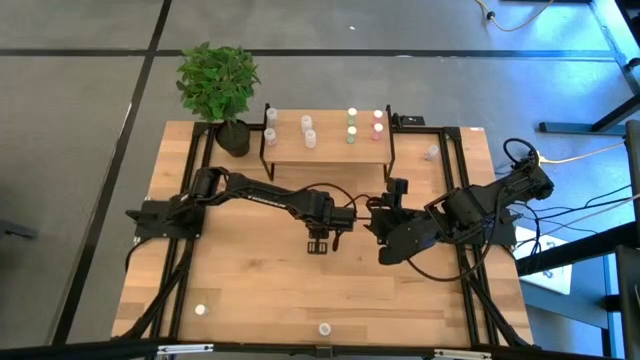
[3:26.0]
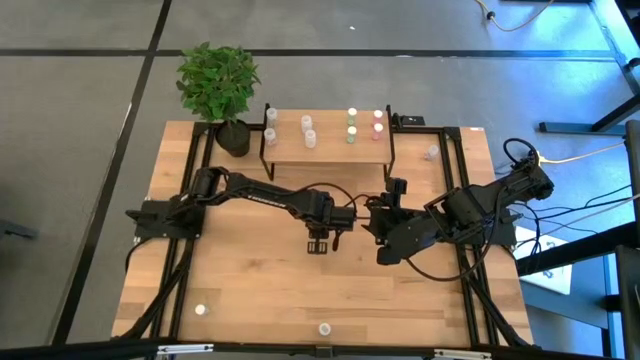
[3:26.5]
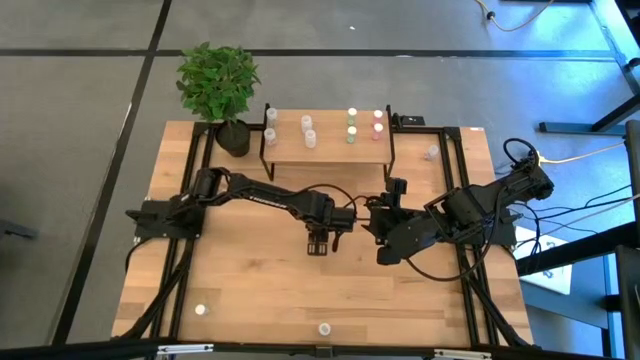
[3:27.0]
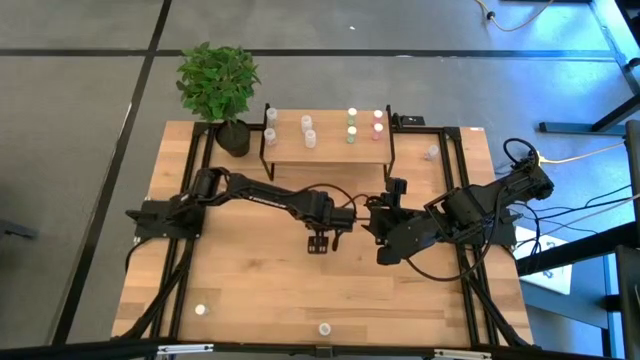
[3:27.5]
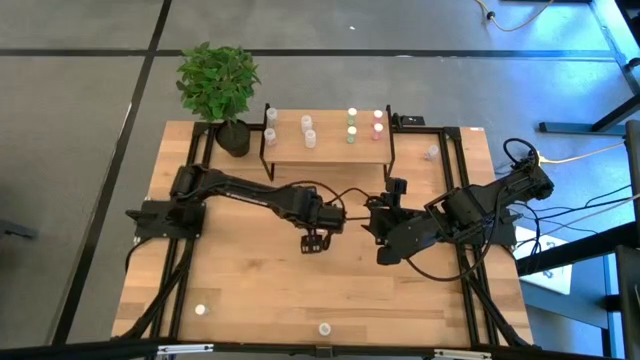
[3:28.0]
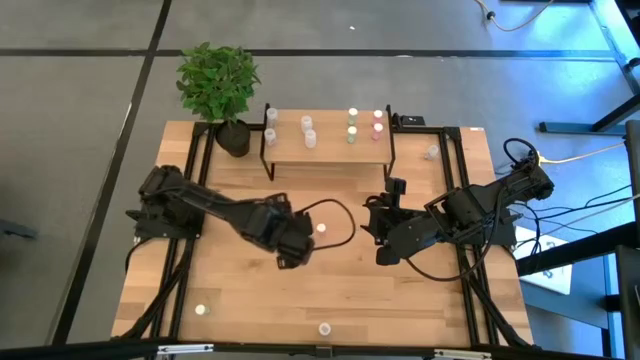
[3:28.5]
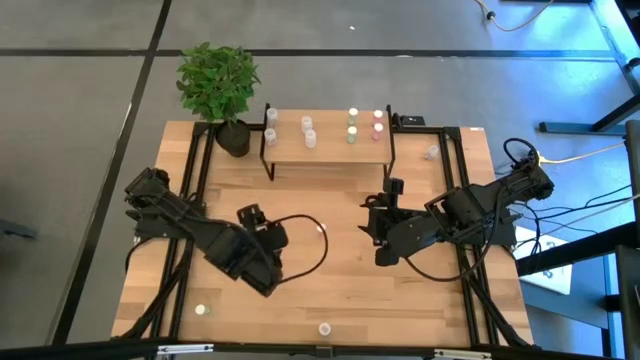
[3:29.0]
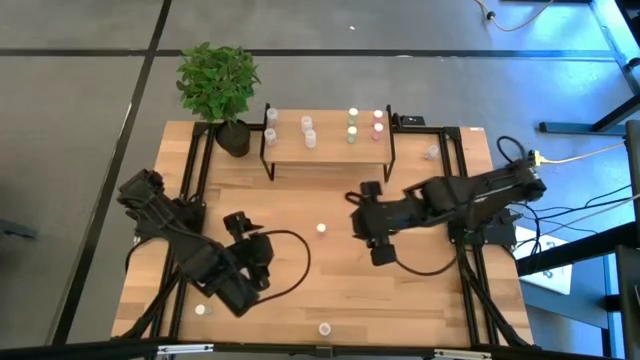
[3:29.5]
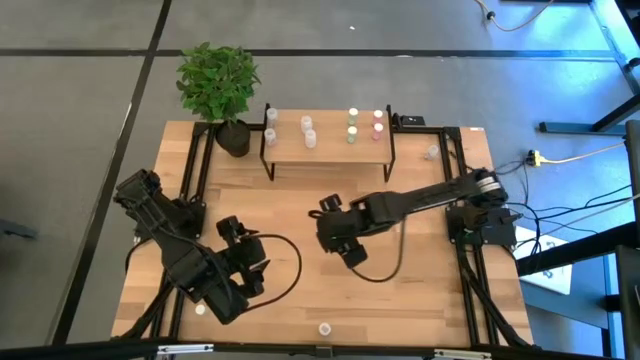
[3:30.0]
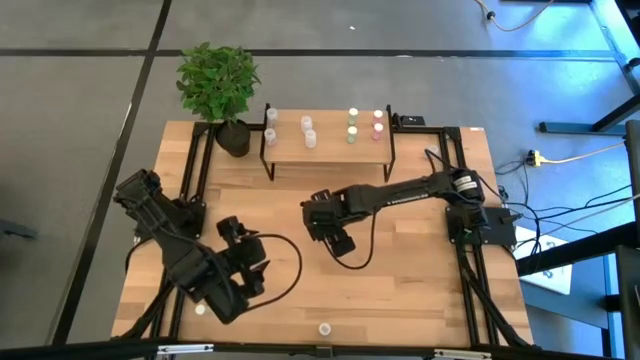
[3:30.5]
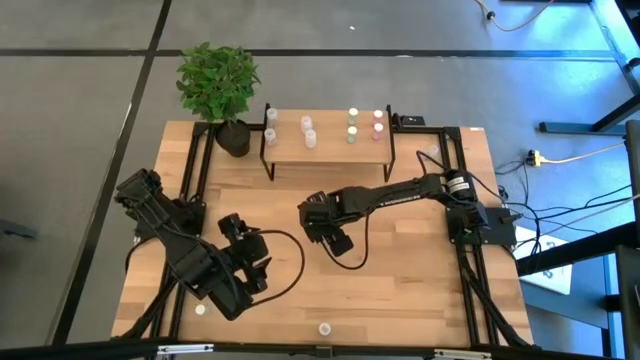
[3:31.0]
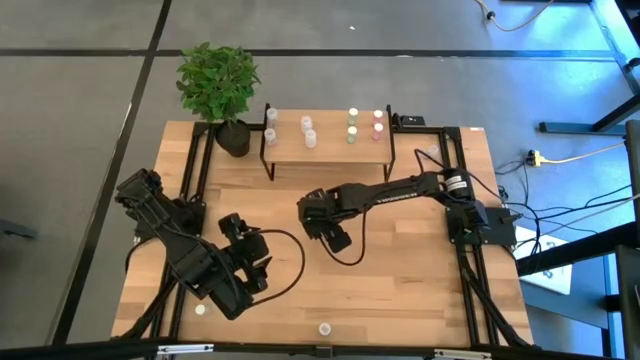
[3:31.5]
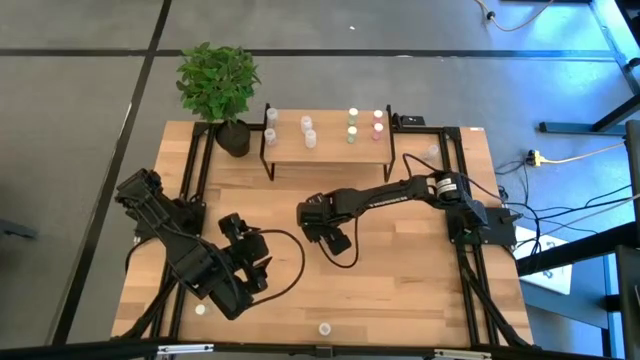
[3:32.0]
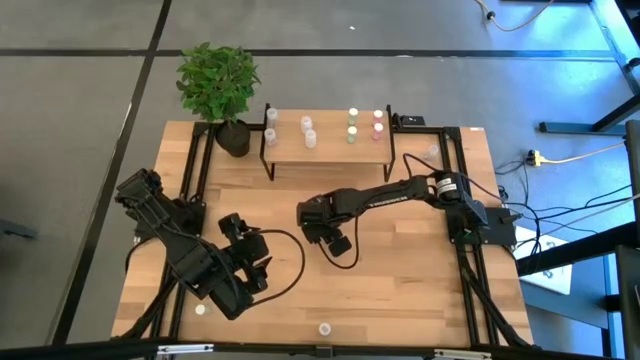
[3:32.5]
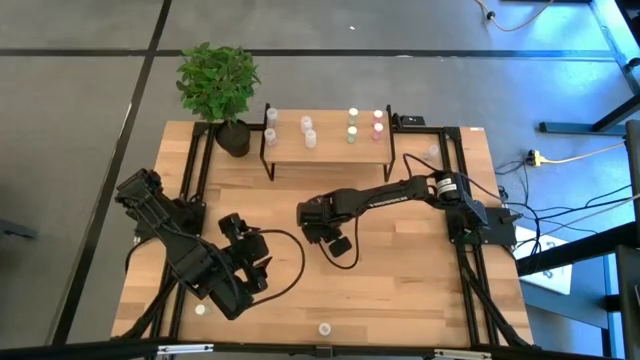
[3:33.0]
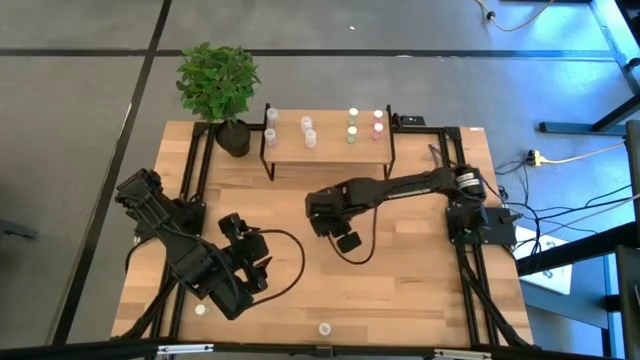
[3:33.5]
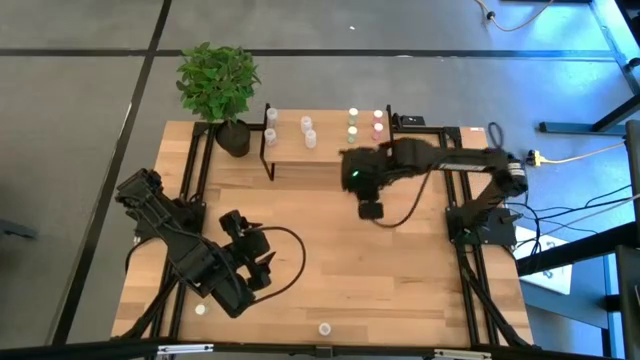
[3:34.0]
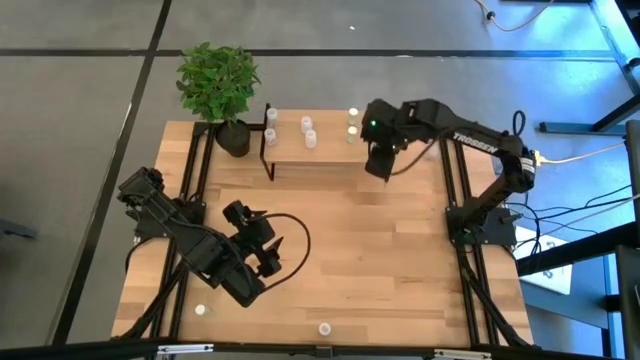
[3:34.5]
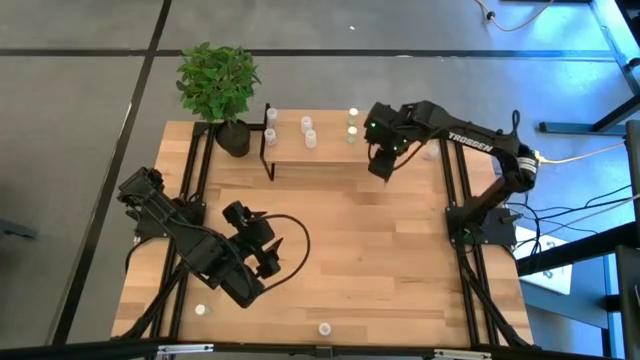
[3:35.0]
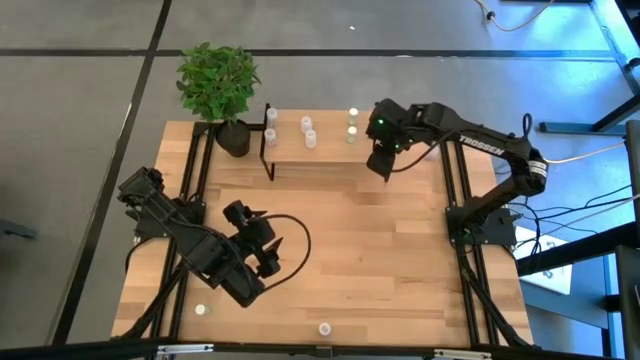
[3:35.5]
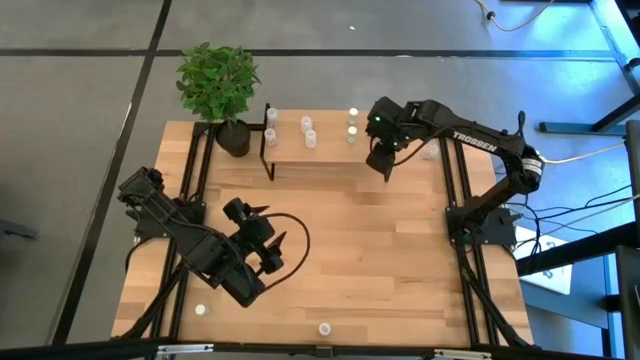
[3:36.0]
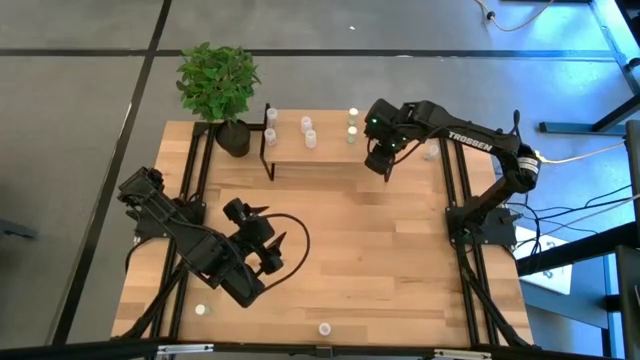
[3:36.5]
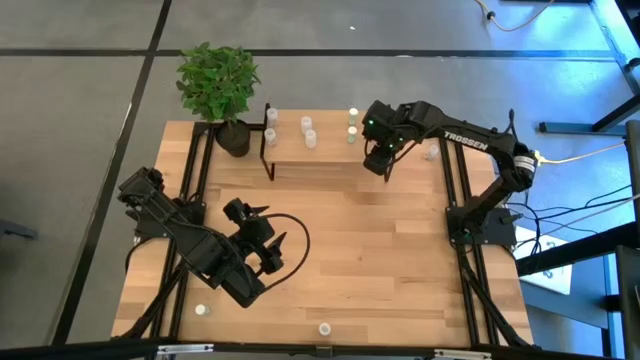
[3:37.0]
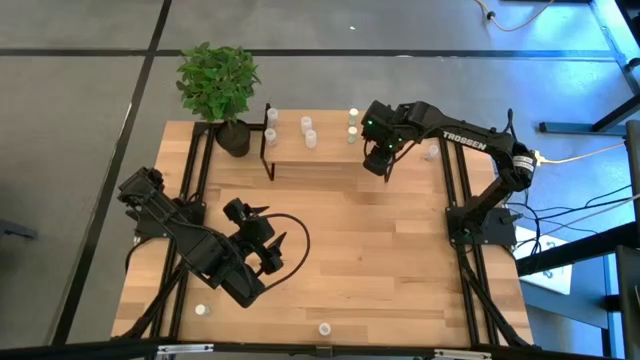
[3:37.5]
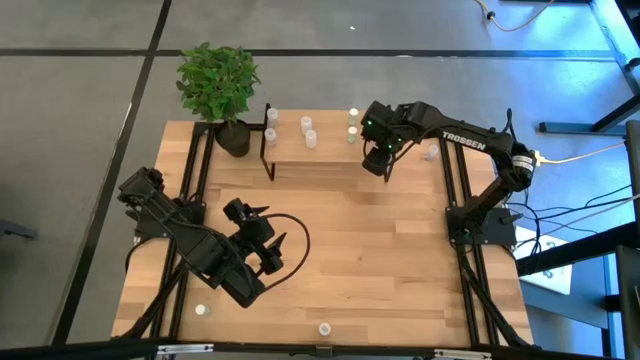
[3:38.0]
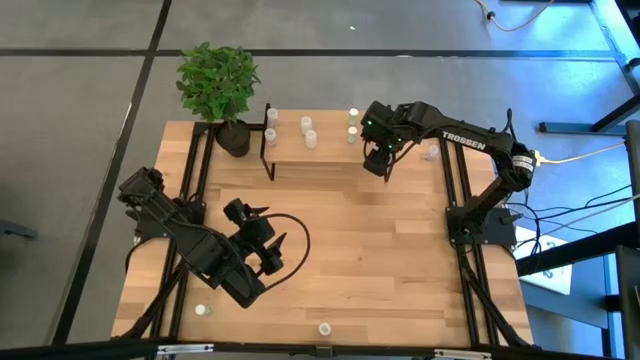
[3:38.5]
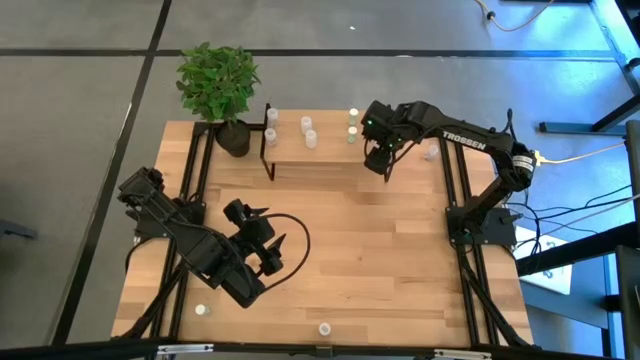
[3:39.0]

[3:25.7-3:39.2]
Task: Pick and place medicine bottles onto shelf by color
Put the red pill bottle on the shelf aligned with the other red pill bottles

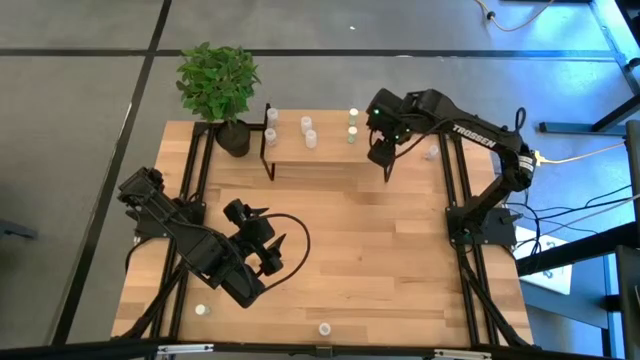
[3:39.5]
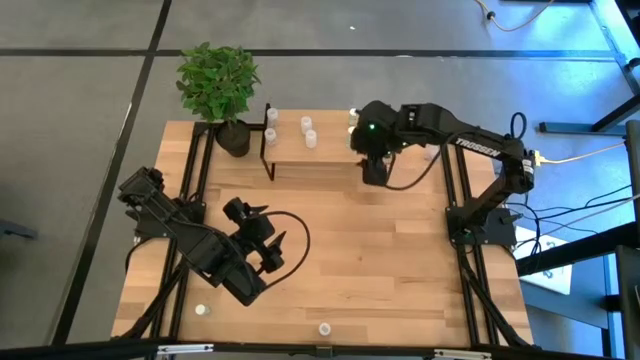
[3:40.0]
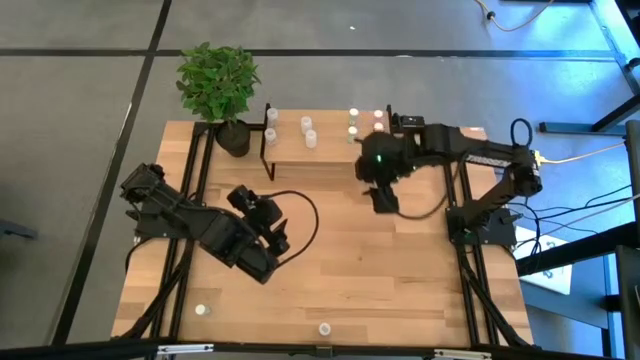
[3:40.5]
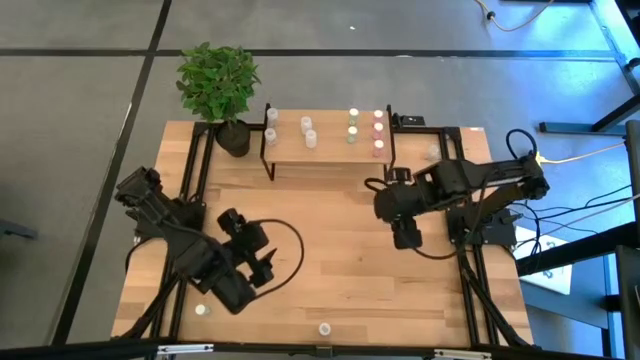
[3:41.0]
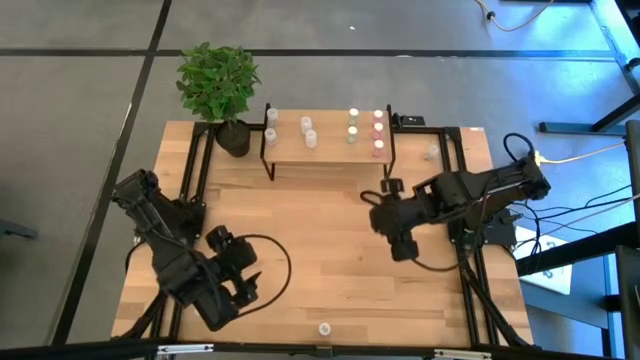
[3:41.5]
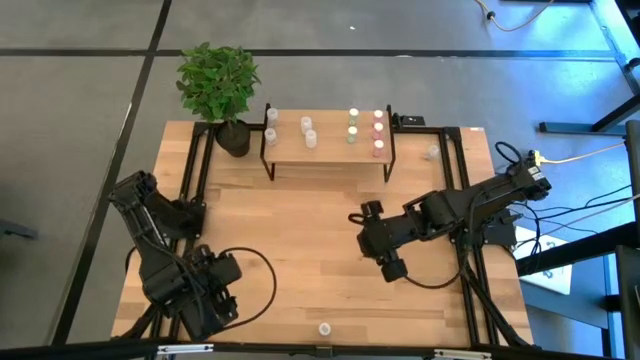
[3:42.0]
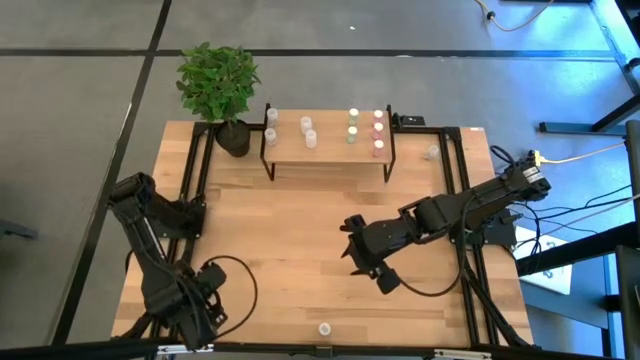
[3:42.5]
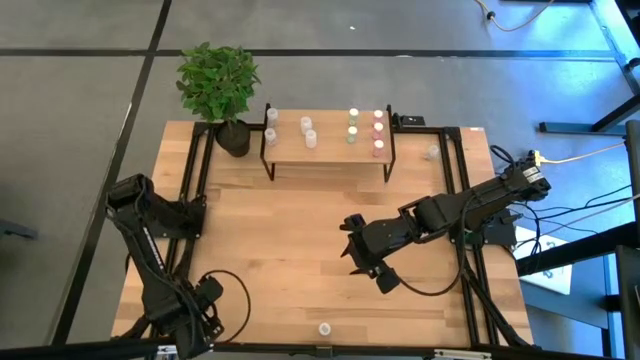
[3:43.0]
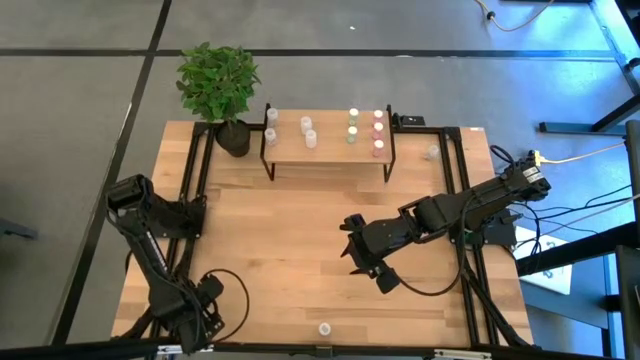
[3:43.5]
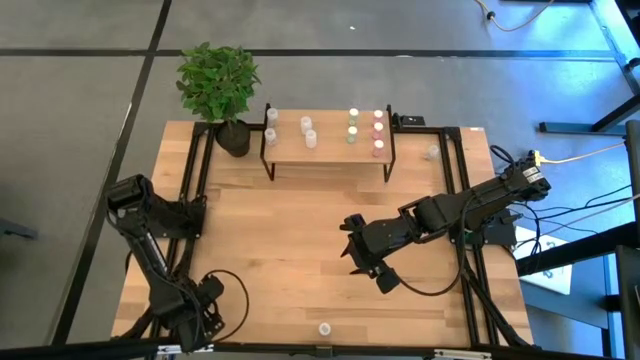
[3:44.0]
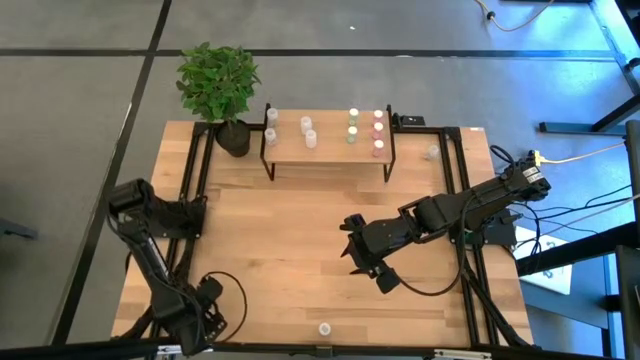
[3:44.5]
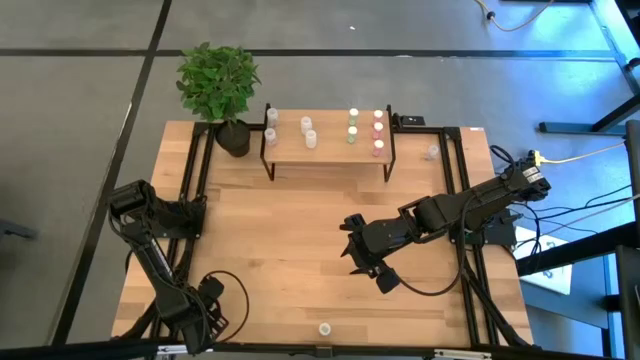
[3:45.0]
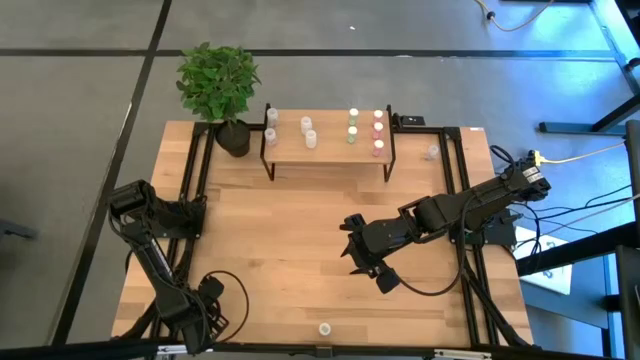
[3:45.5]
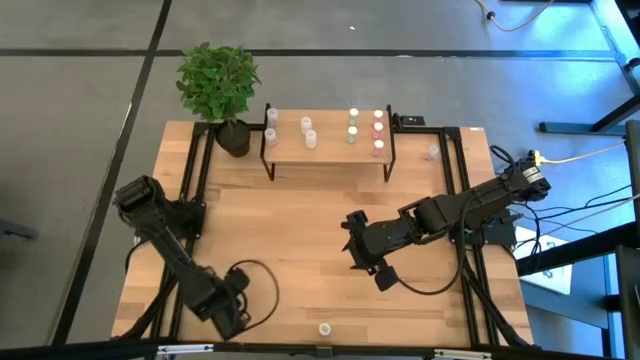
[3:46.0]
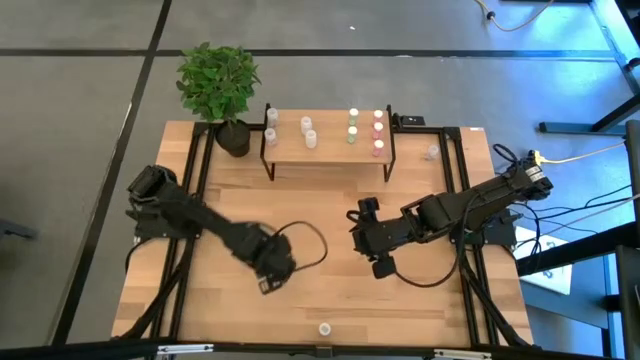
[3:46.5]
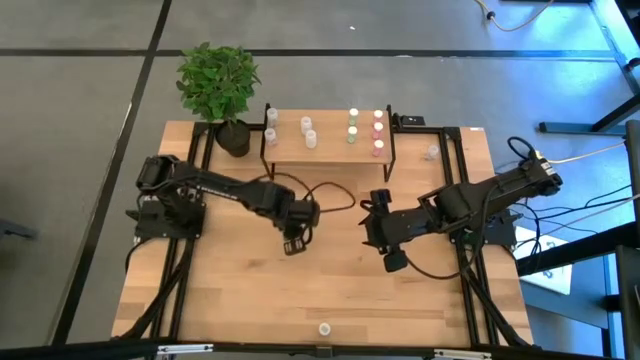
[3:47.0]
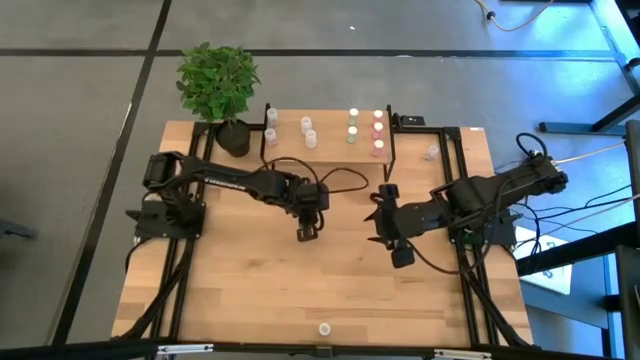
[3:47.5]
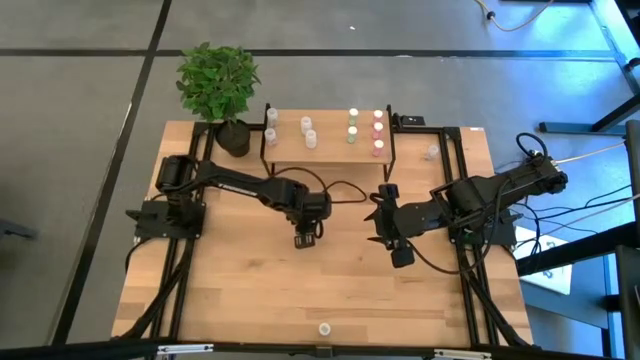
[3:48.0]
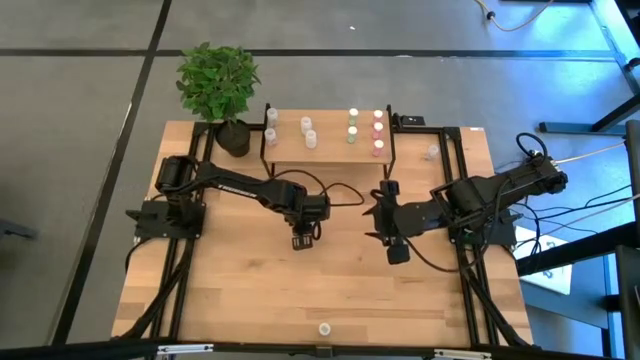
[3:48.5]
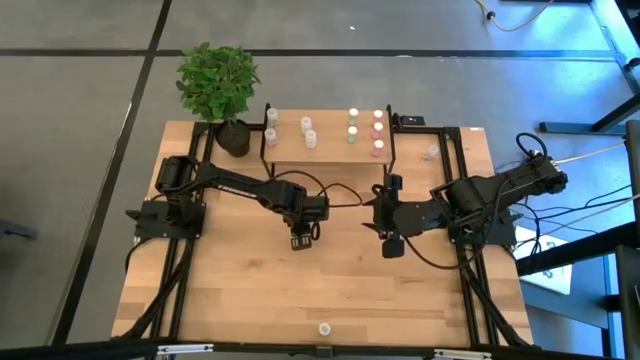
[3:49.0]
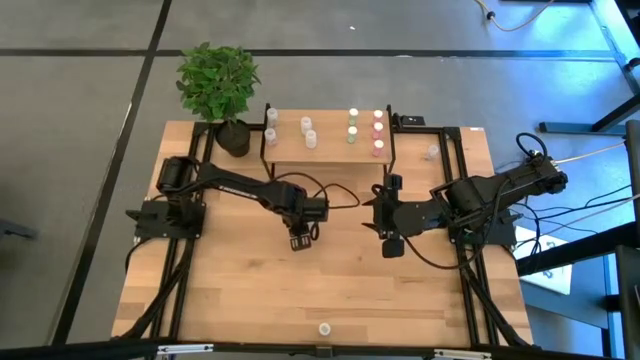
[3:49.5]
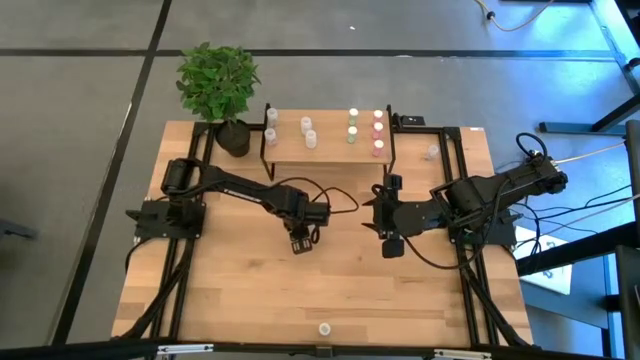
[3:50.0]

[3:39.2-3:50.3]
Put the green pill bottle on the shelf aligned with the other green pill bottles
